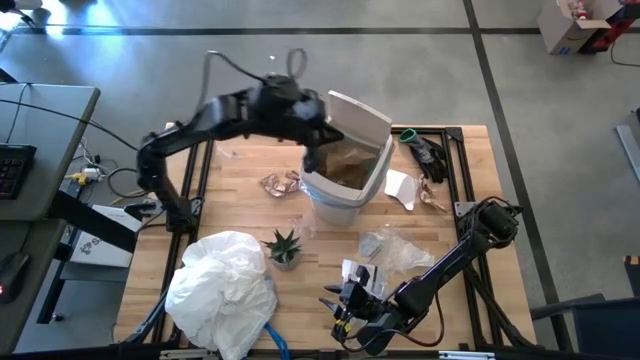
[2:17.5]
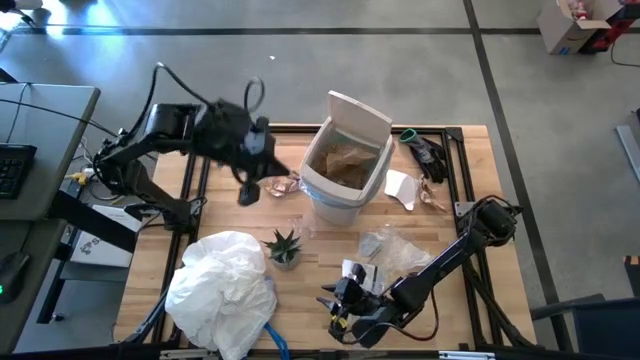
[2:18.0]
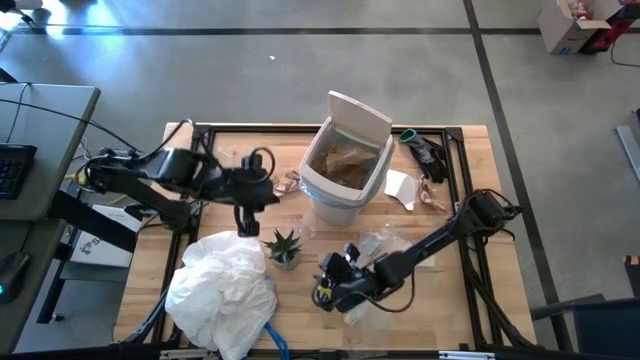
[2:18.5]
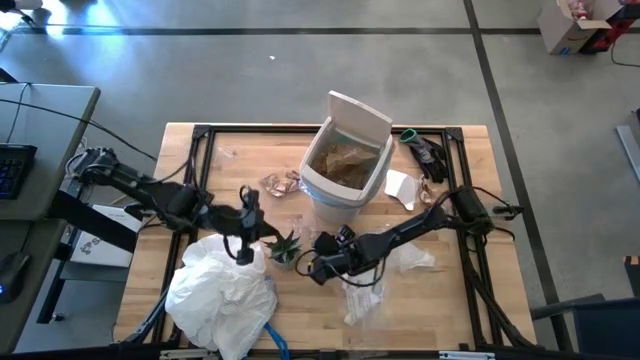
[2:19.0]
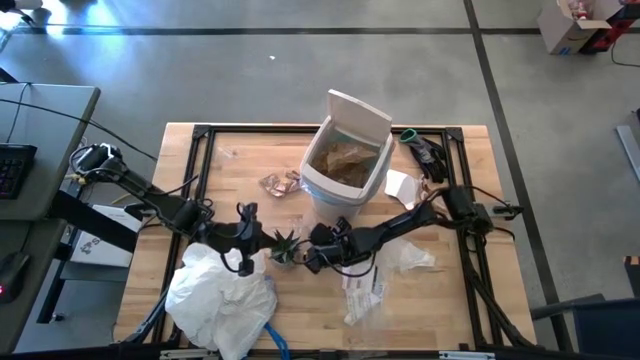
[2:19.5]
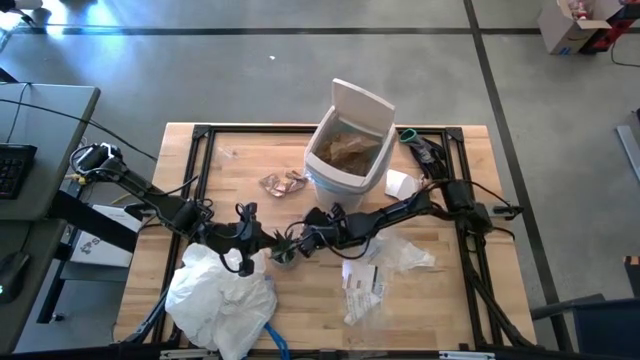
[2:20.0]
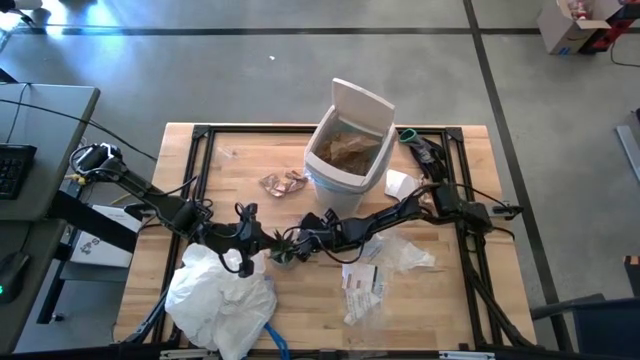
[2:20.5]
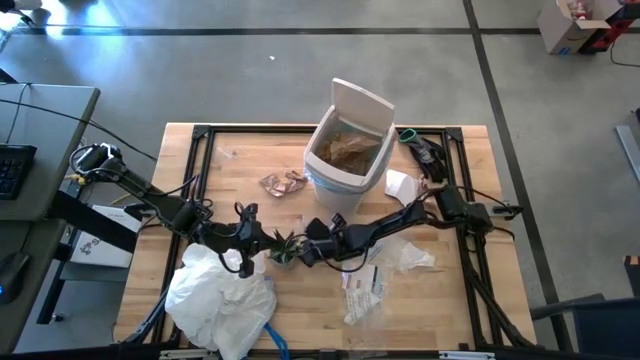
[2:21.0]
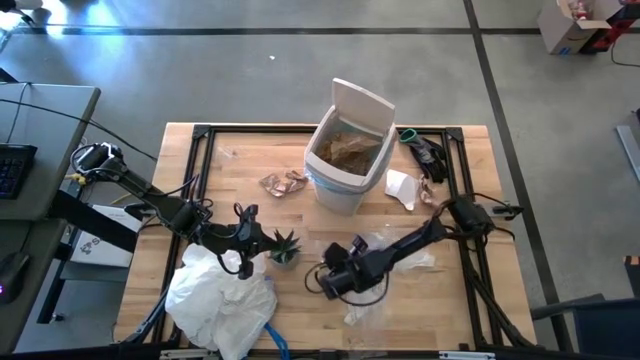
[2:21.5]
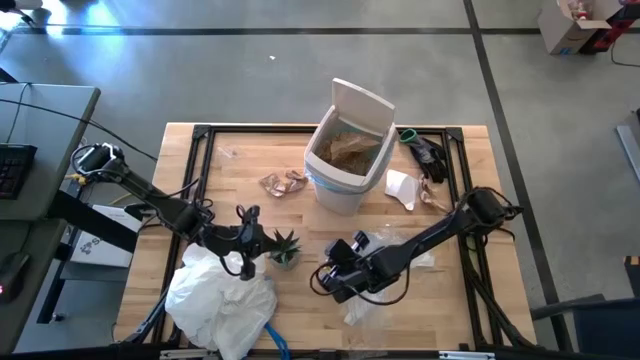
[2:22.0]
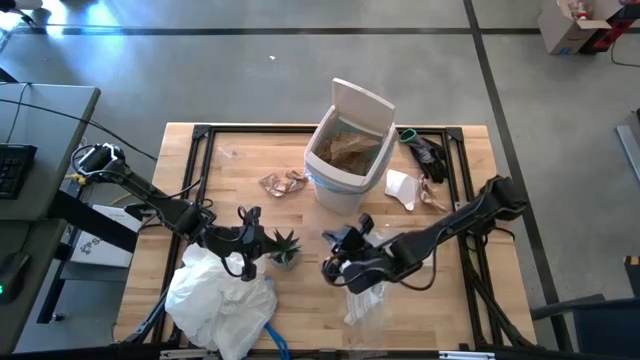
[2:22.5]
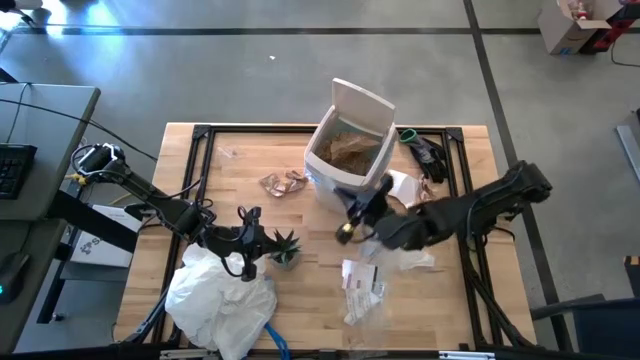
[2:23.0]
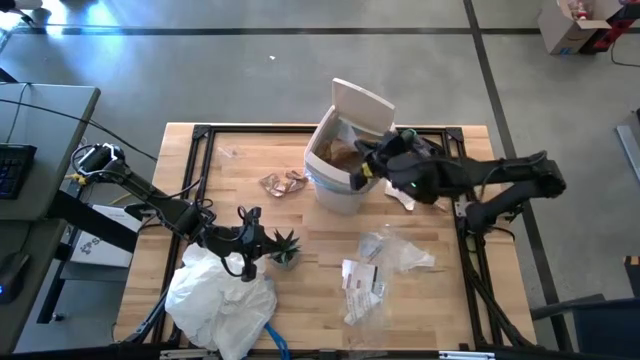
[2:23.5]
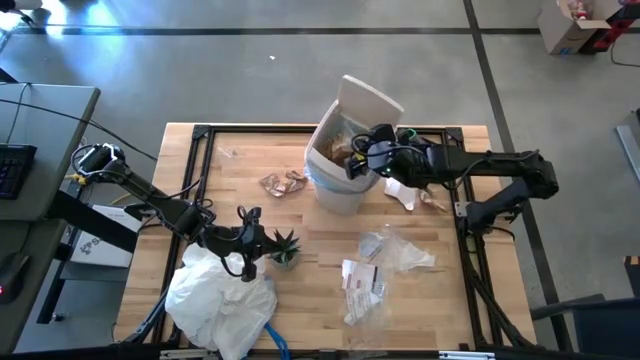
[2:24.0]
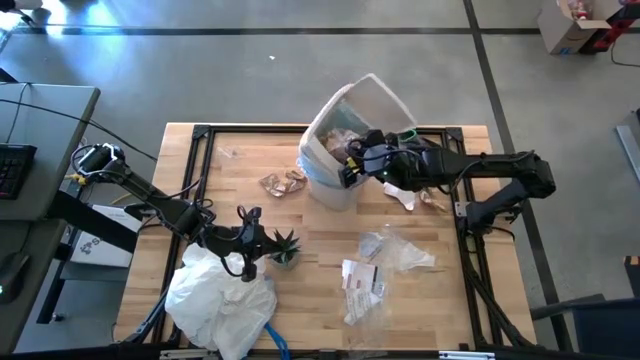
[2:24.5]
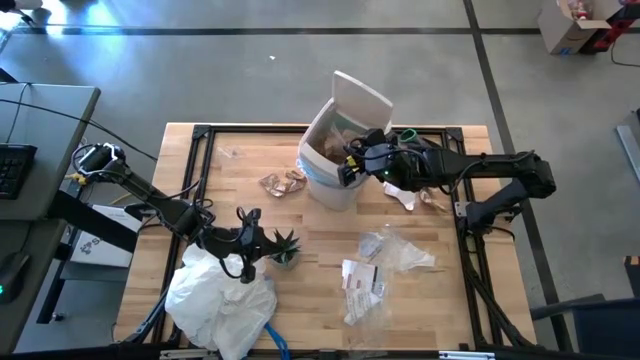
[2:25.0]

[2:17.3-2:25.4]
Task: place trash/remove bag and relplace
Put the transparent plastic into the trash bin

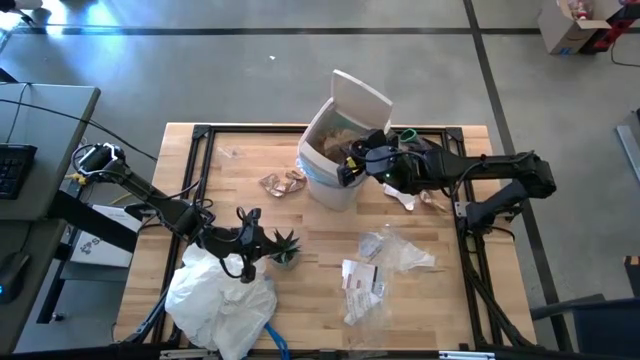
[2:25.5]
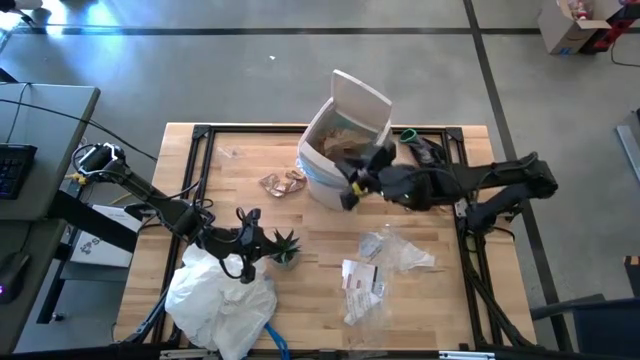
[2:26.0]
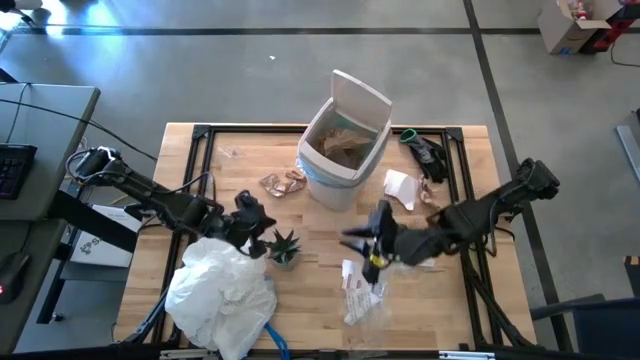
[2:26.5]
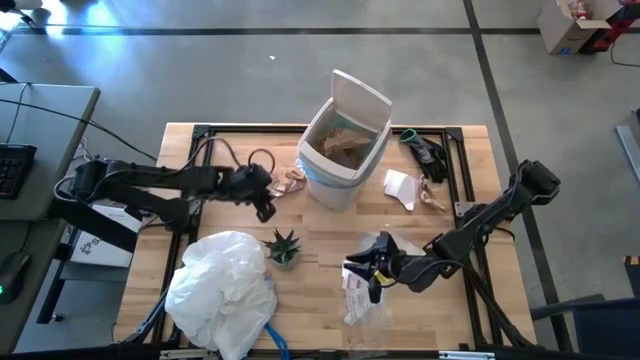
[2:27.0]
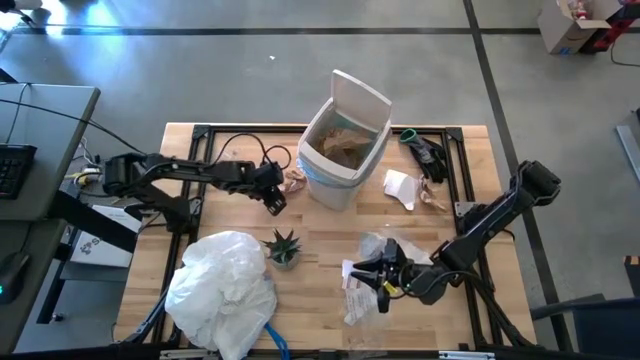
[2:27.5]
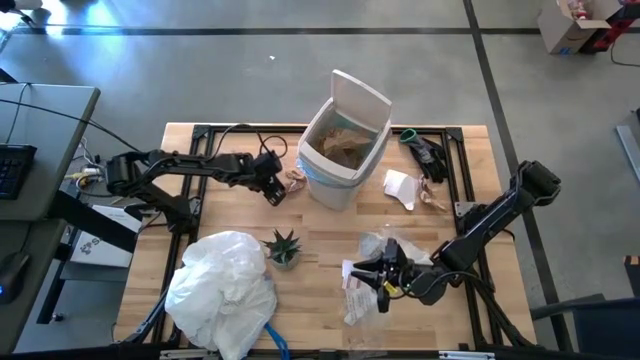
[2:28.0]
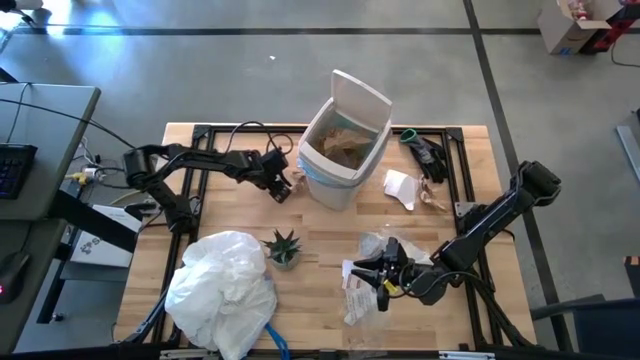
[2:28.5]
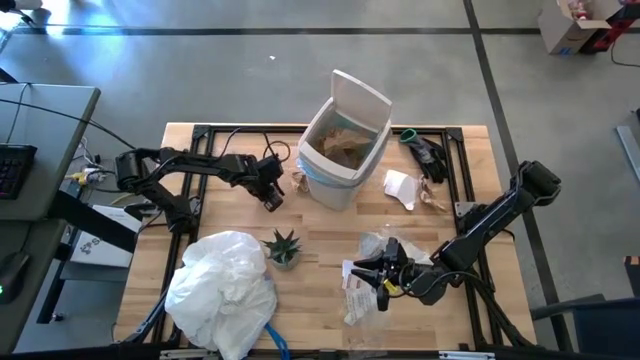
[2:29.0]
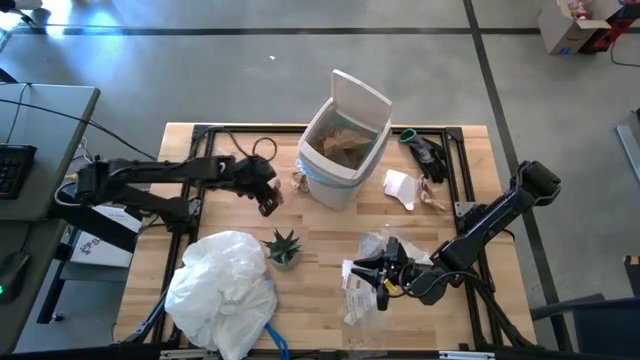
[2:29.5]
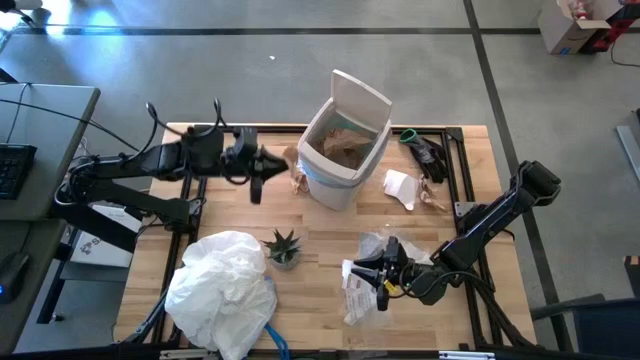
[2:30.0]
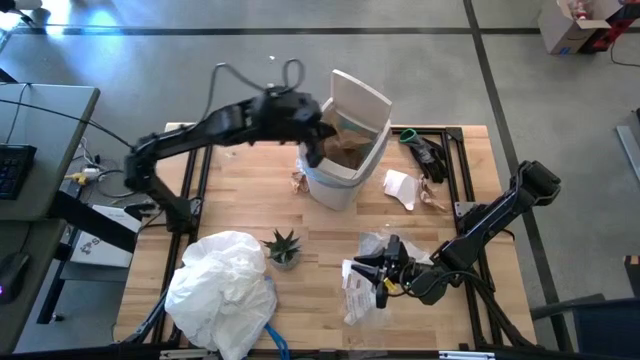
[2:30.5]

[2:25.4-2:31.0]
Put the brown napkin into the trash bin

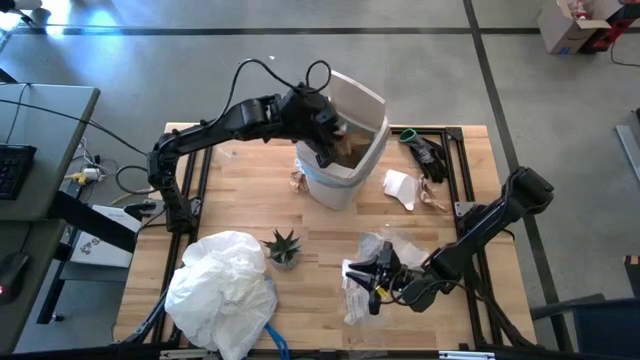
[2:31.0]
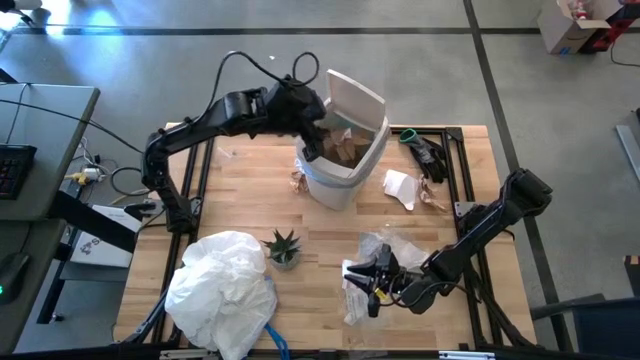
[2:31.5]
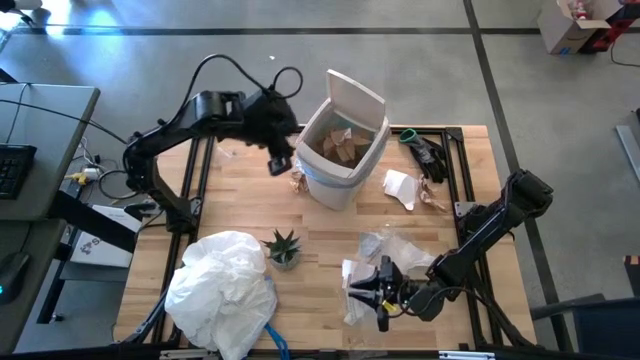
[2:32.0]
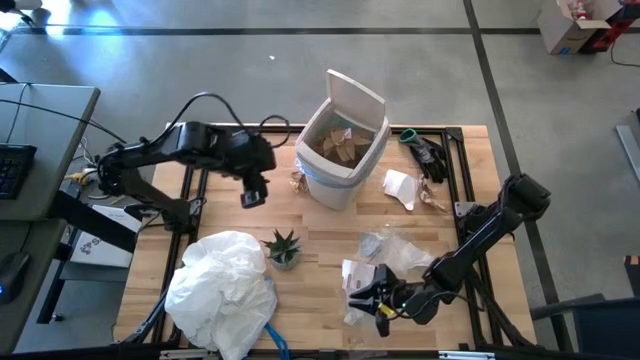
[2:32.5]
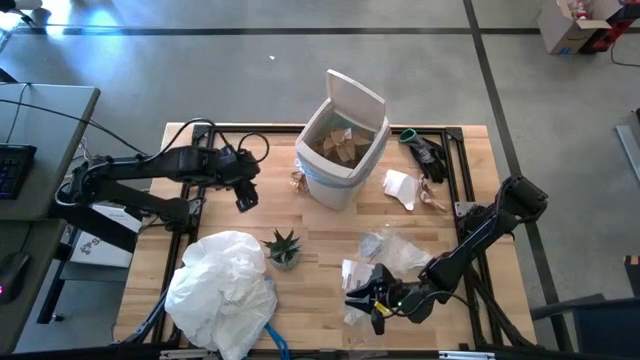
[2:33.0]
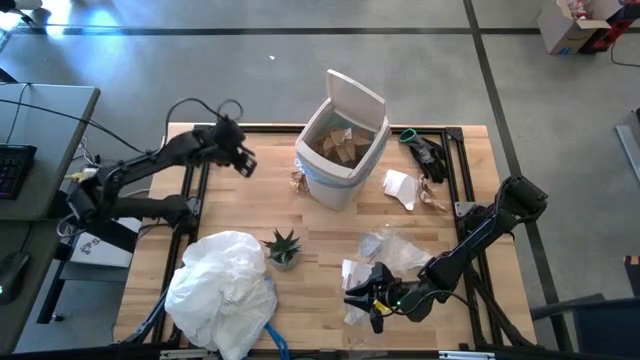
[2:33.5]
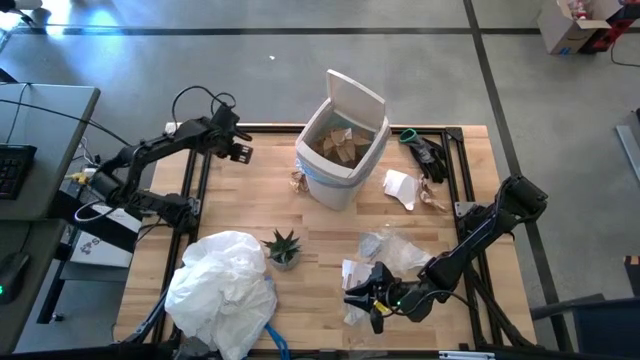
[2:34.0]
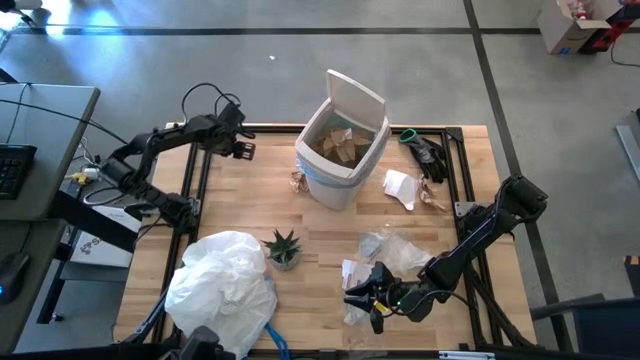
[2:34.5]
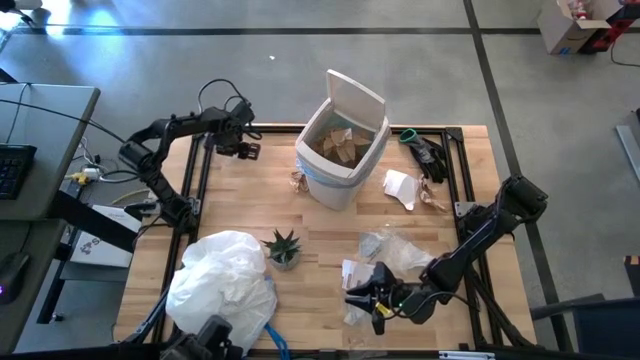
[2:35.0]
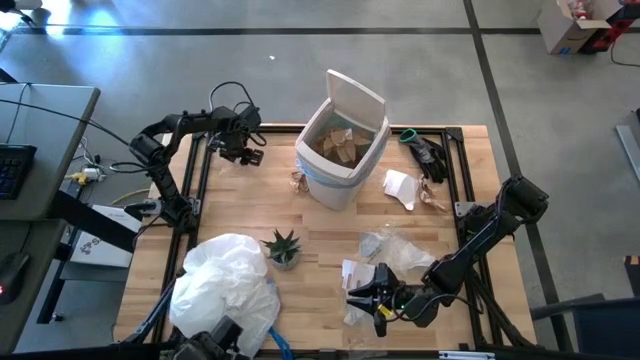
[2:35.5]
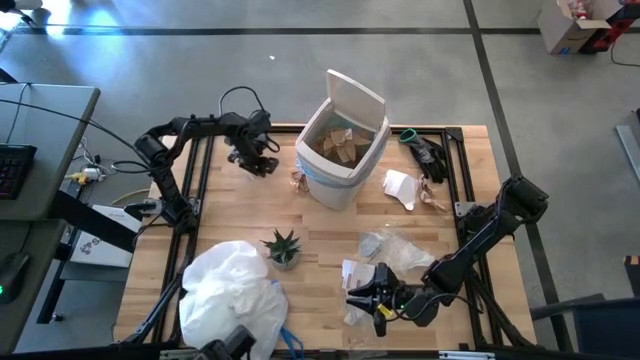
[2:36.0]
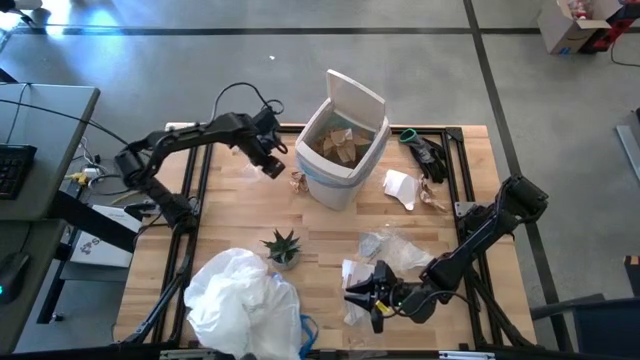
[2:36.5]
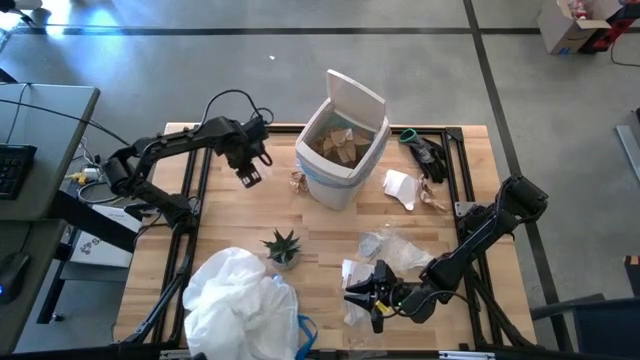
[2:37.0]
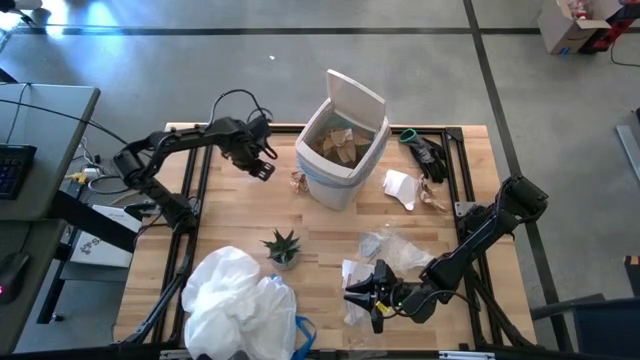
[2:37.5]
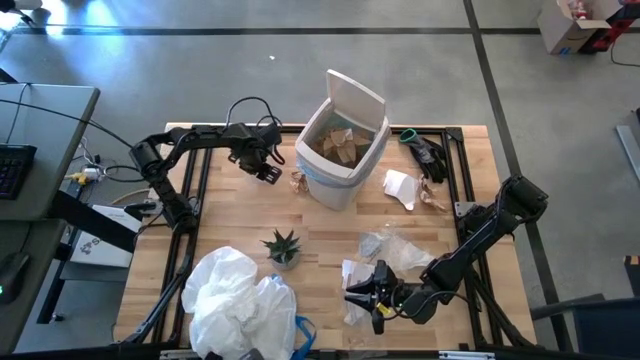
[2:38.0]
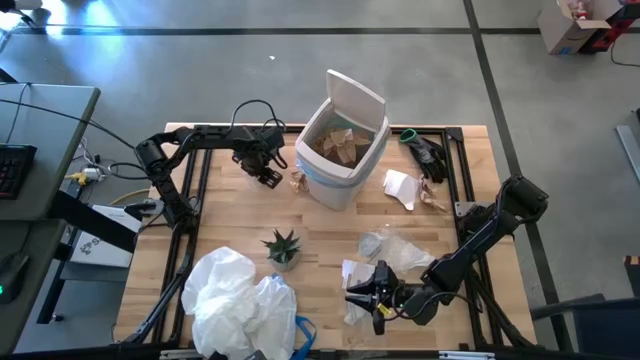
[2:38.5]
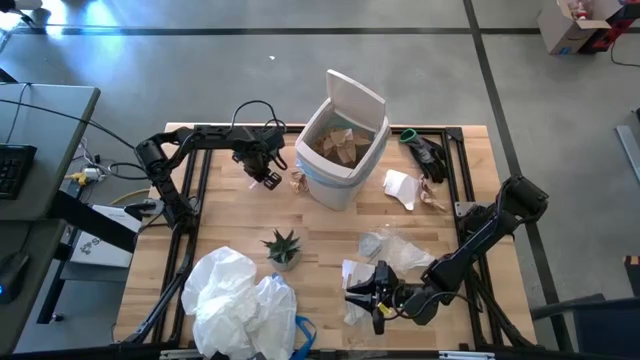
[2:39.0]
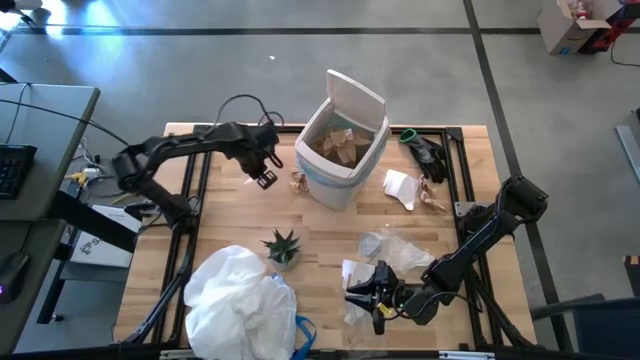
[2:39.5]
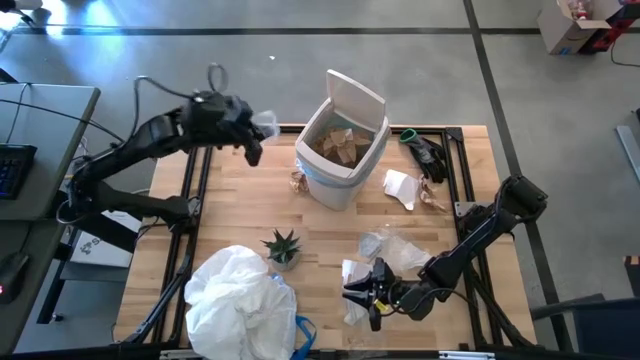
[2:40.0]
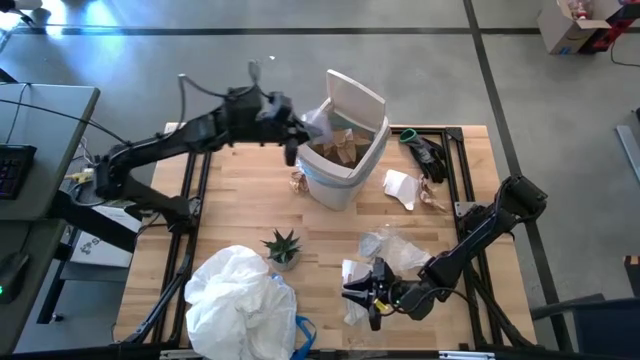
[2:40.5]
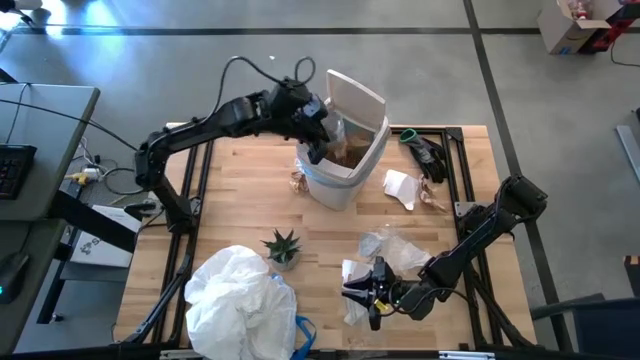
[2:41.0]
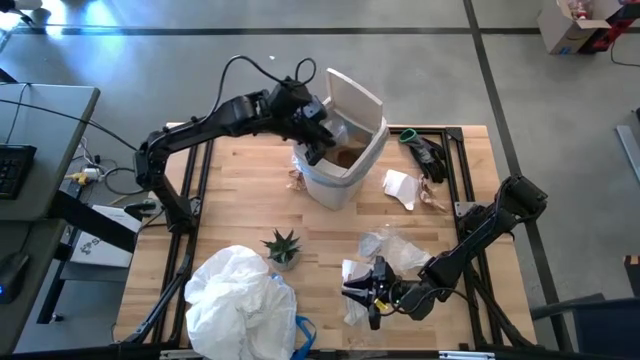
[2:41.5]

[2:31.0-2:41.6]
Put the transparent plastic into the trash bin
